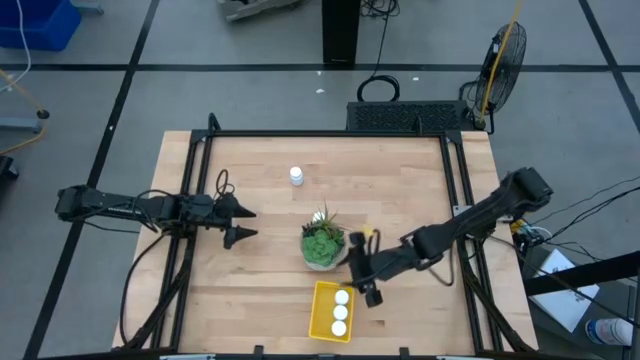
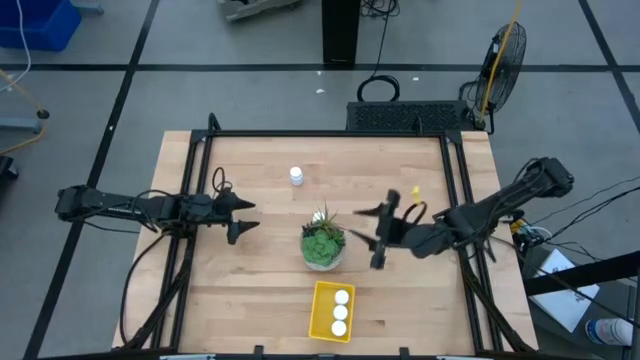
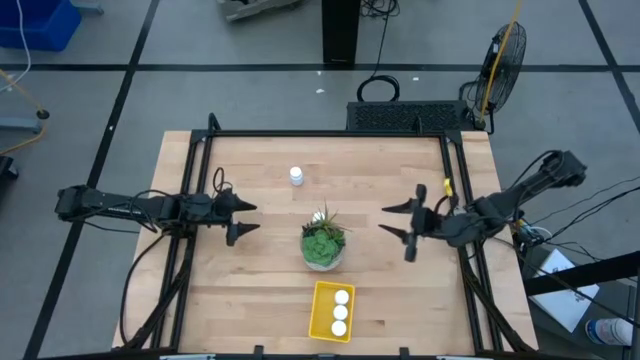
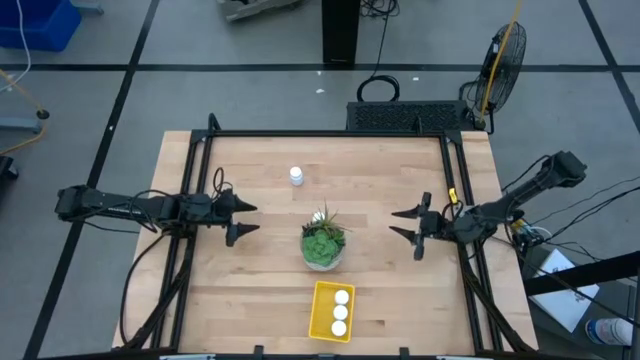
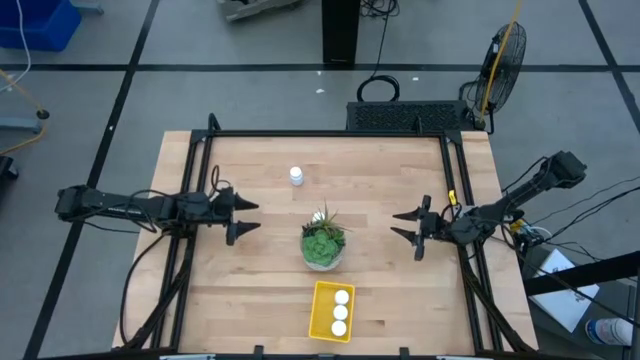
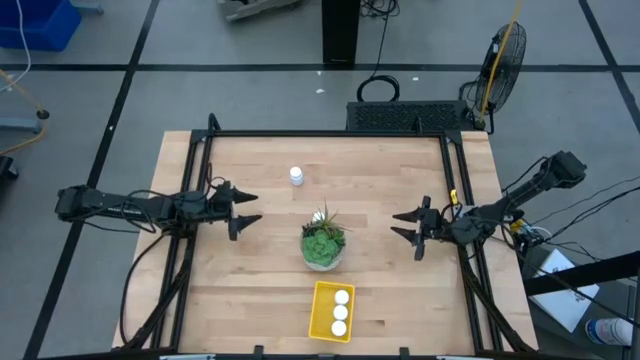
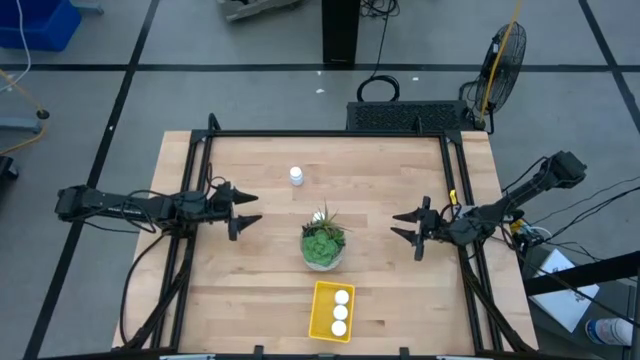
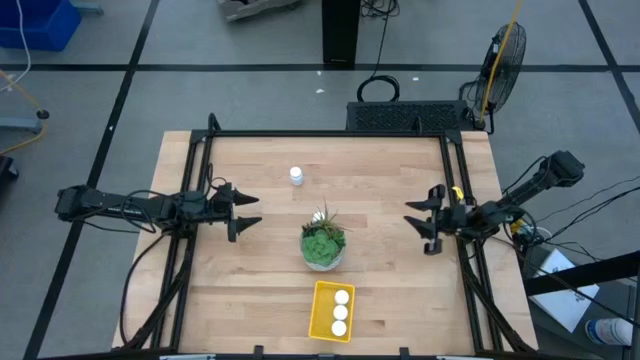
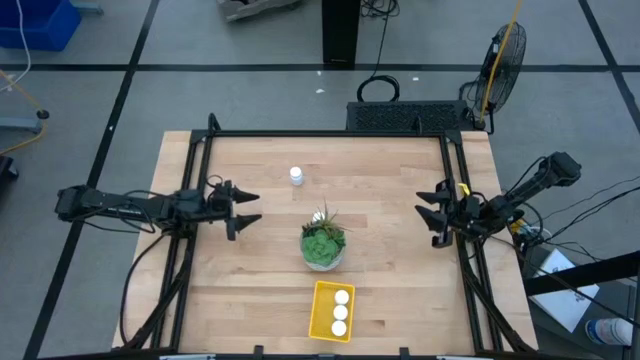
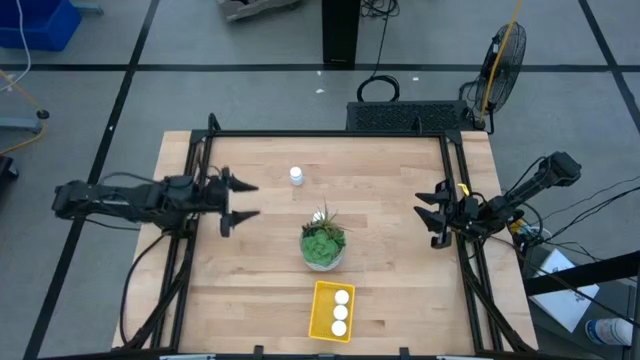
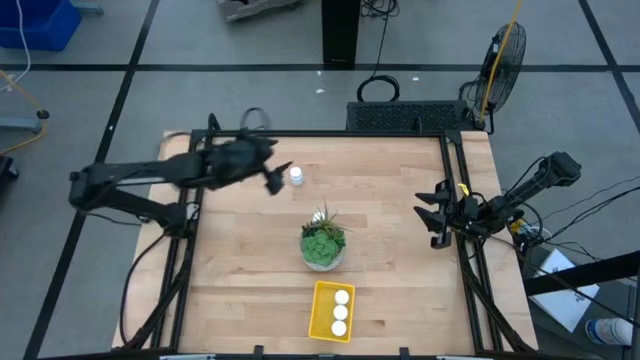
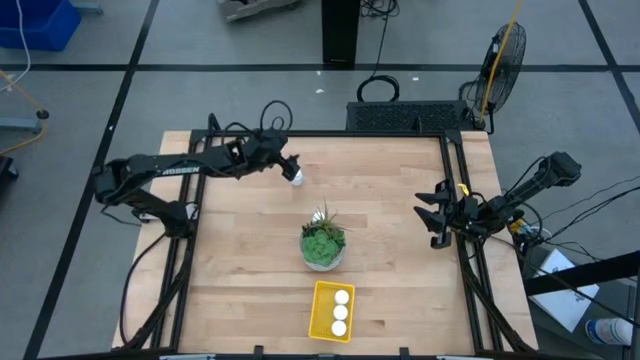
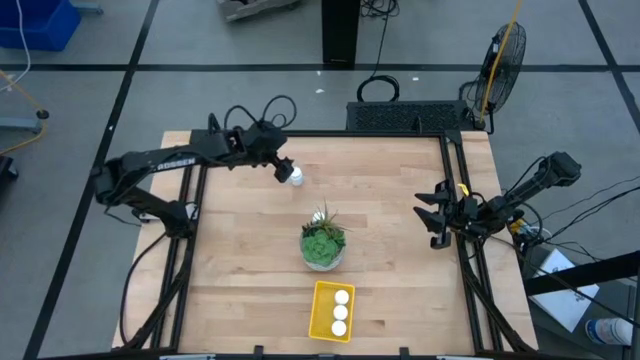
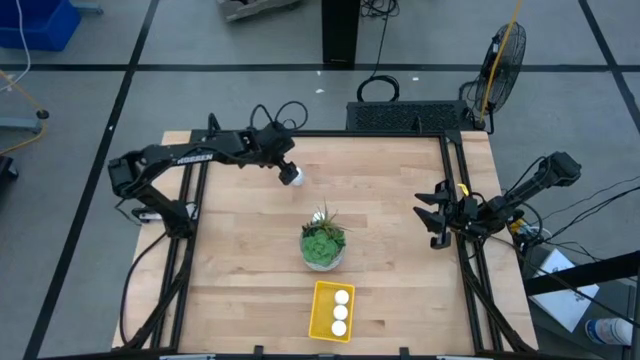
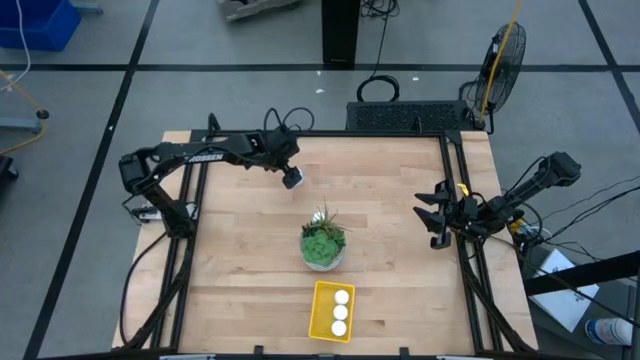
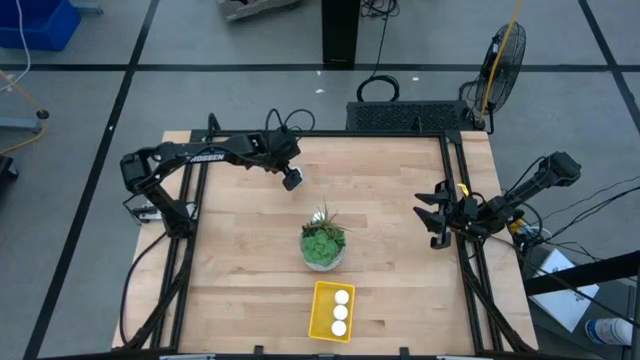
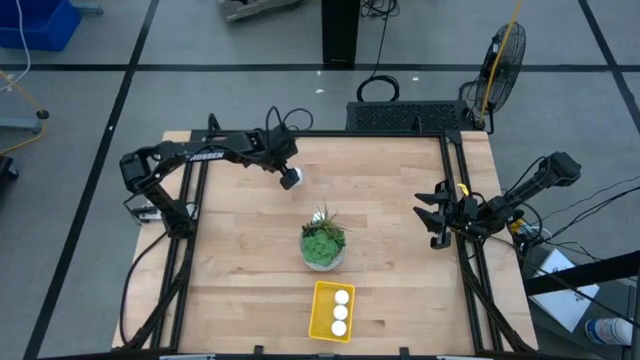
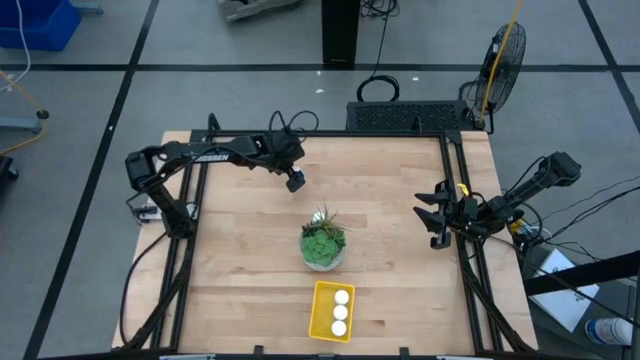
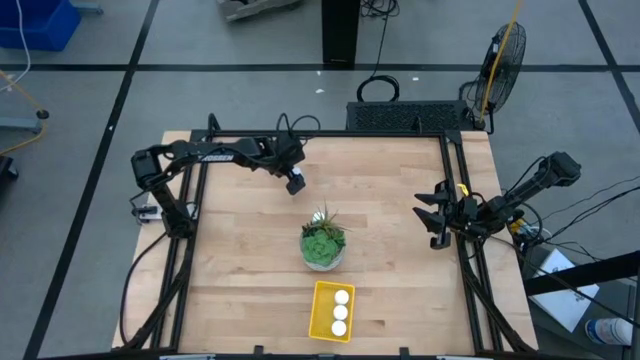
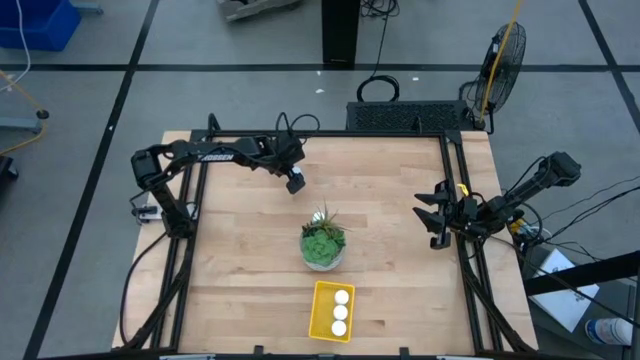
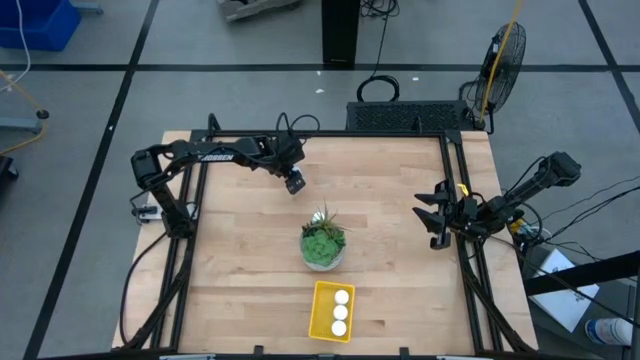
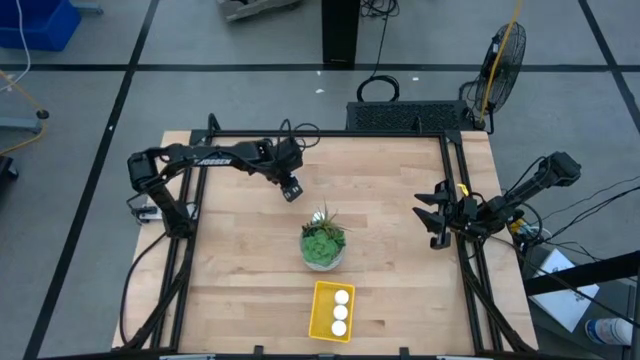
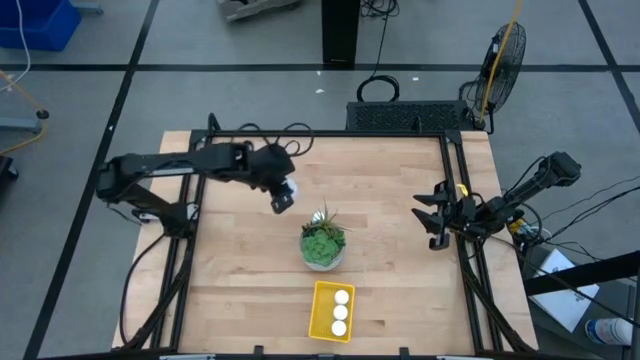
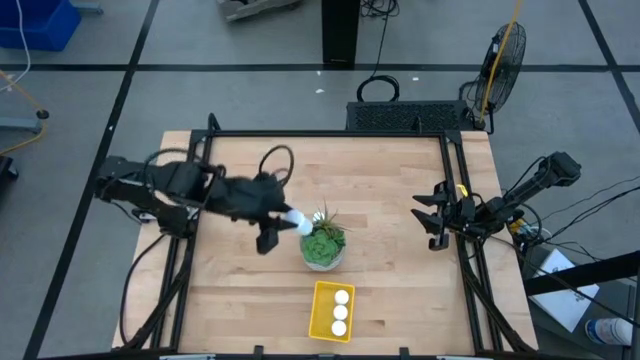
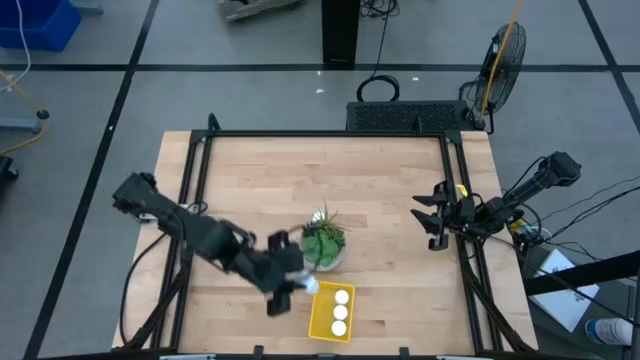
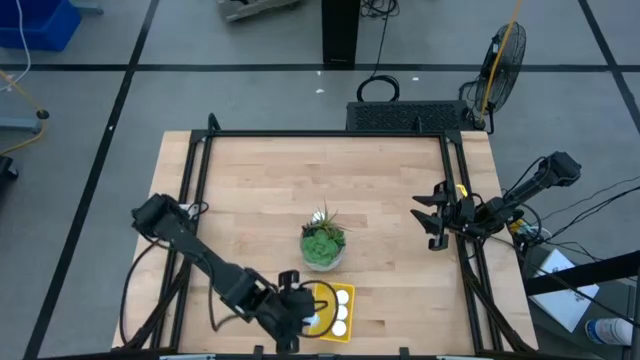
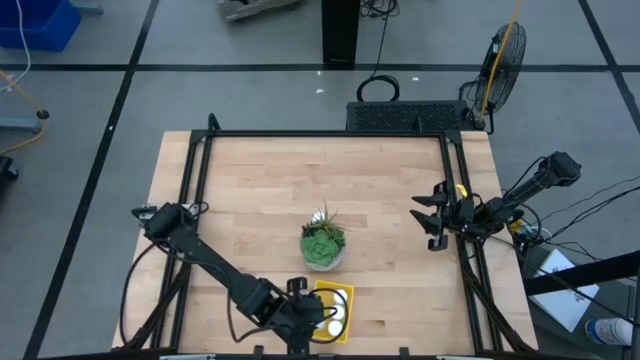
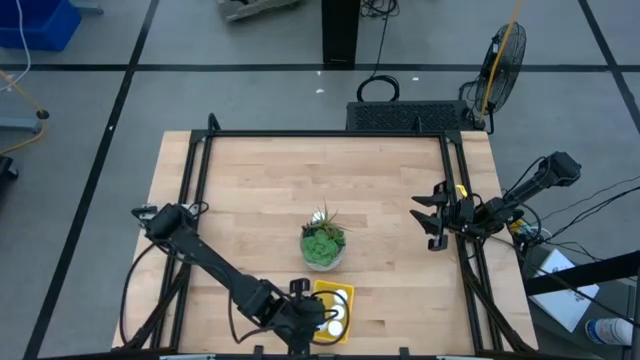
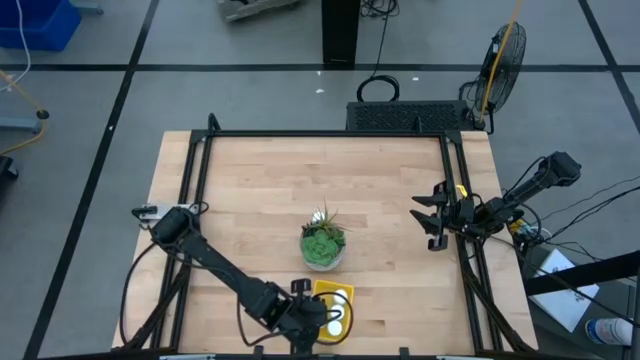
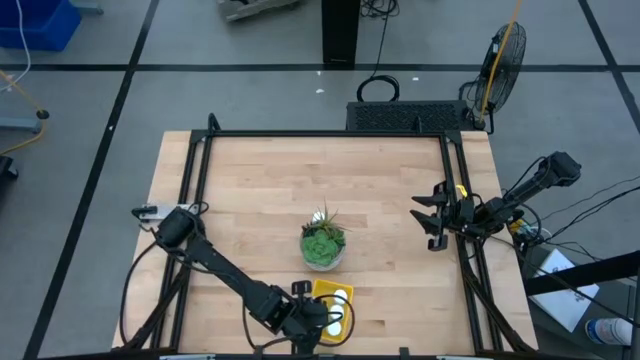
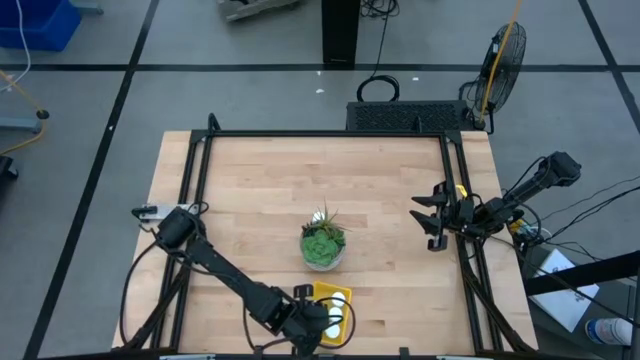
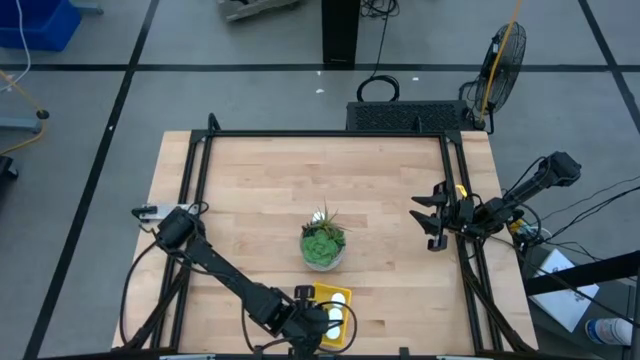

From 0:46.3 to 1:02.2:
Task: Pick and place pill bottles into a basket
Put the white pill bottle into the yellow bin
